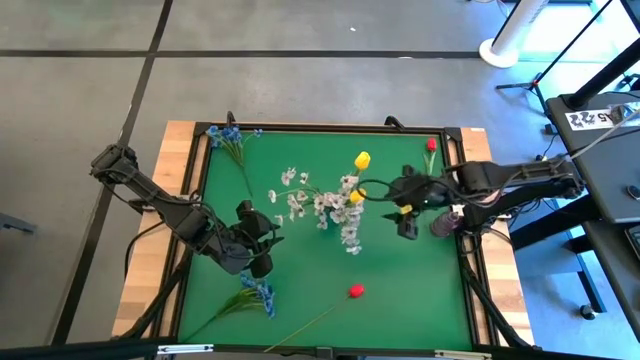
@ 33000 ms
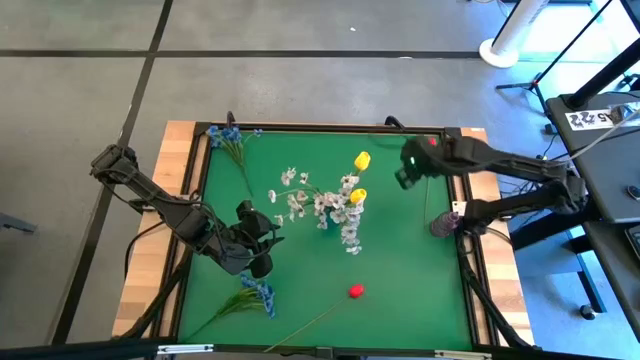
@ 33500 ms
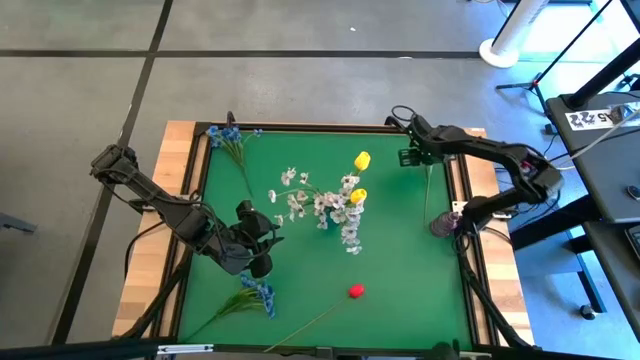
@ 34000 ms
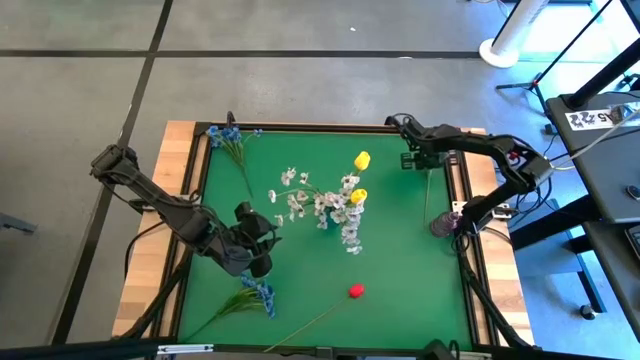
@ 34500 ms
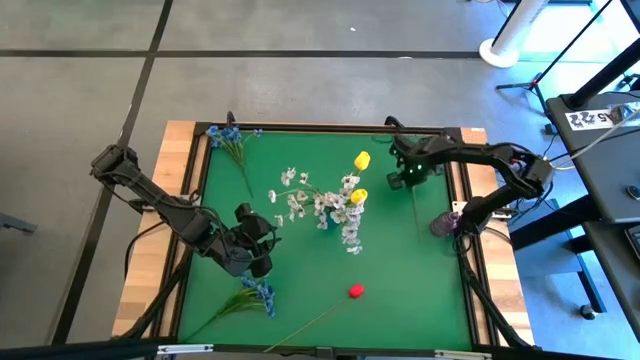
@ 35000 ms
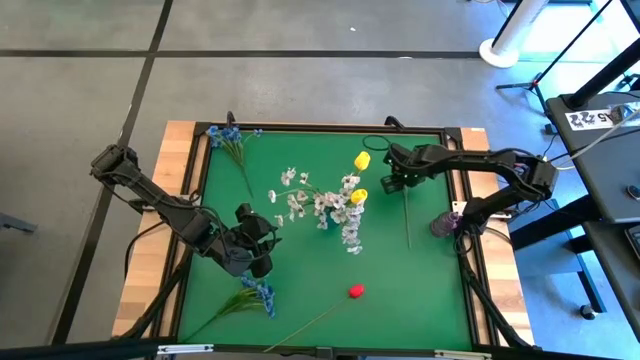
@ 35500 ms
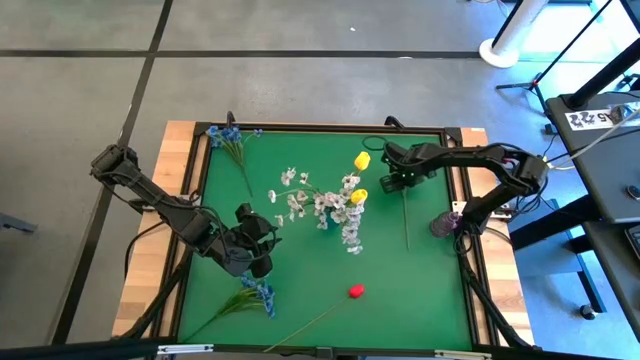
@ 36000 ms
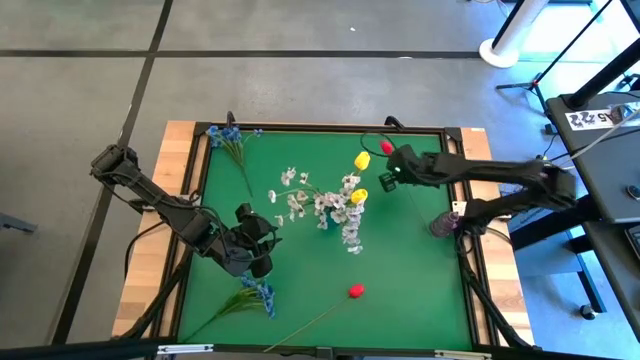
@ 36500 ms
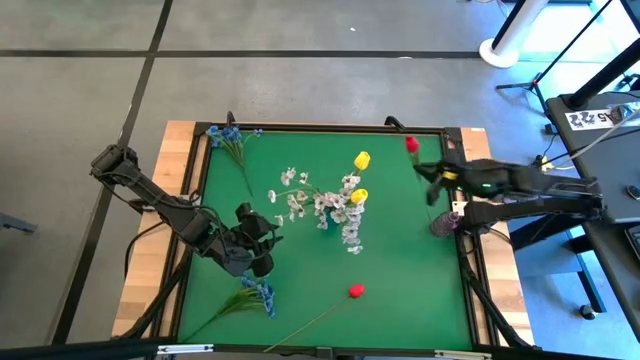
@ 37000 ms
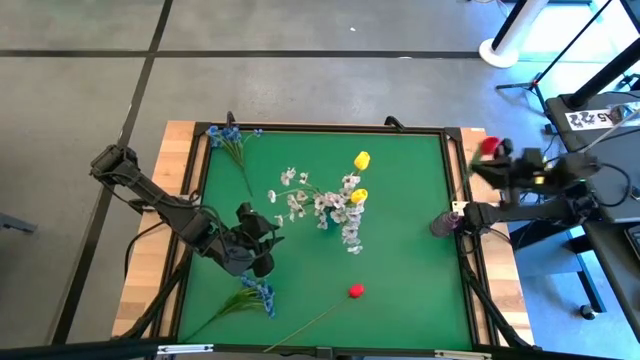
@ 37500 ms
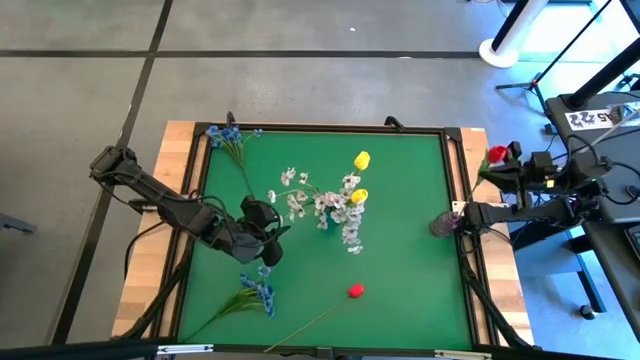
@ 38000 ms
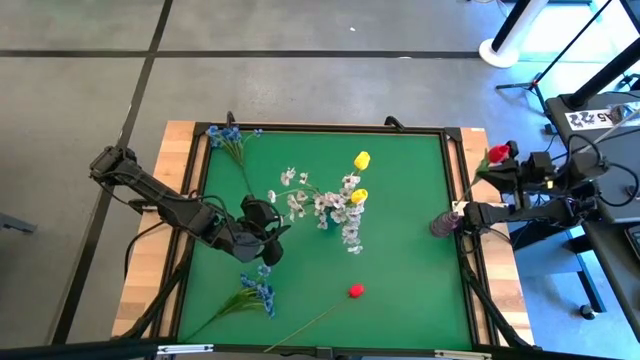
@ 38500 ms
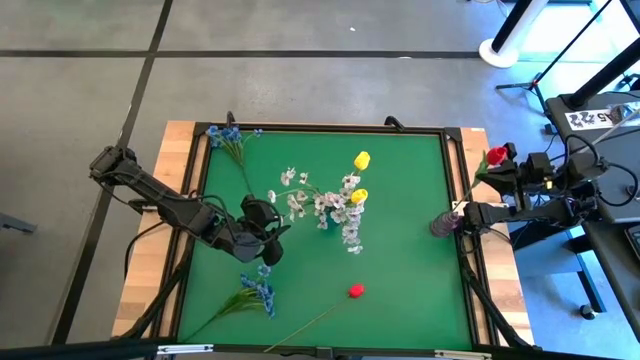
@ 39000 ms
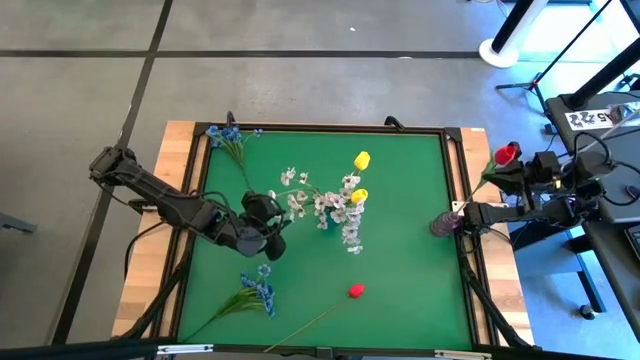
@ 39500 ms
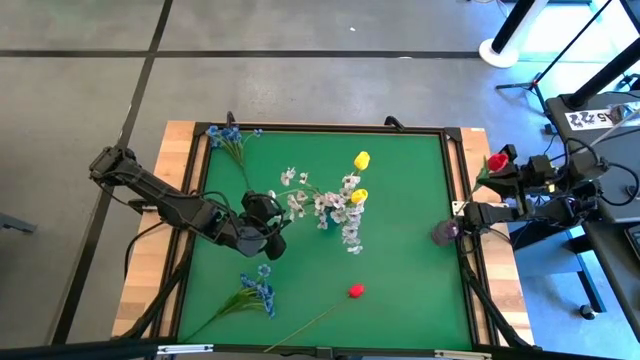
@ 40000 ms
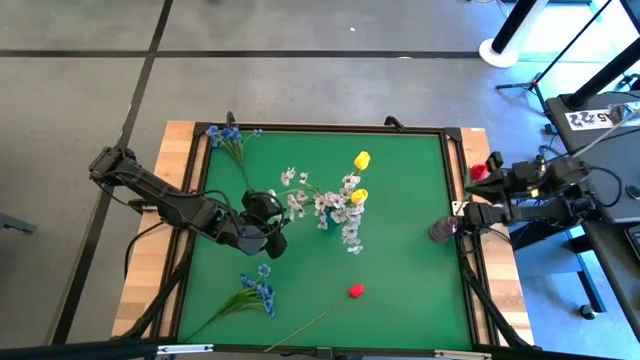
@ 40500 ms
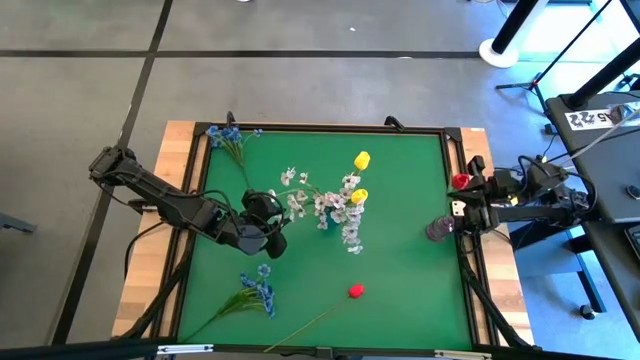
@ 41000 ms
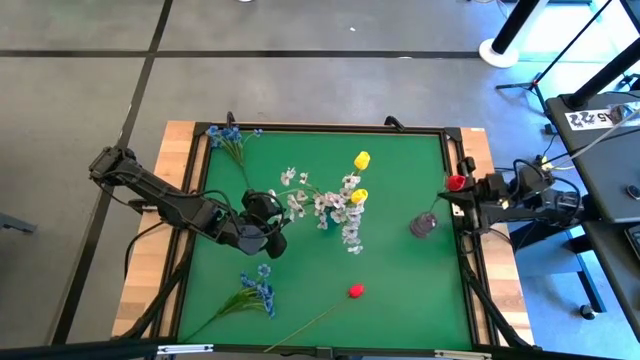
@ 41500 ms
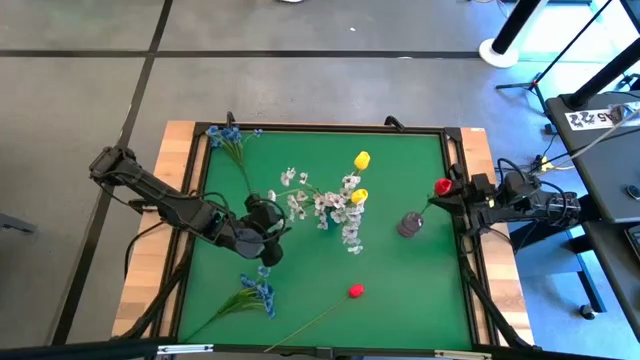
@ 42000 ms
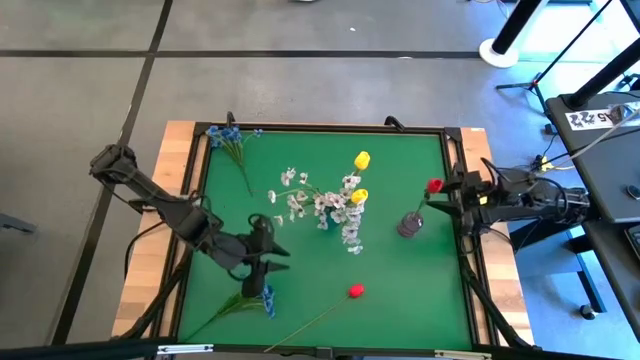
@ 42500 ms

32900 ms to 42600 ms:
Task: Sort flowers into vase by color
Put the top red tulip into the purple vase

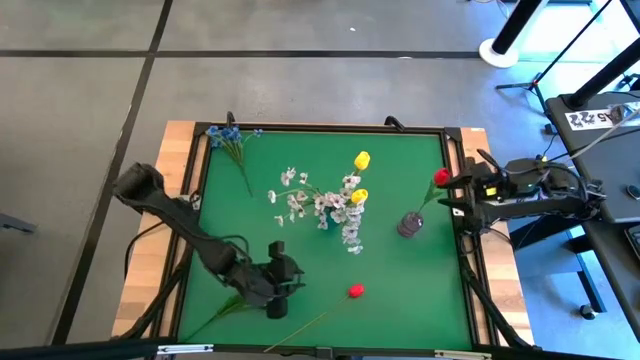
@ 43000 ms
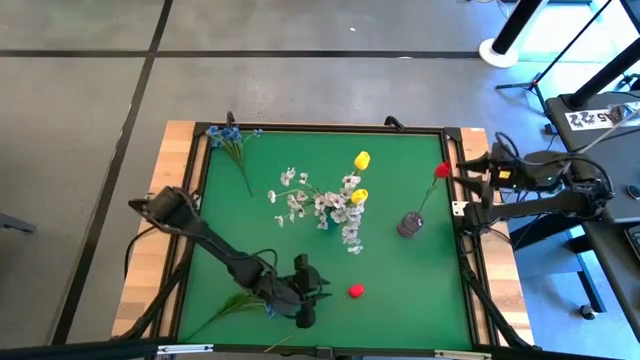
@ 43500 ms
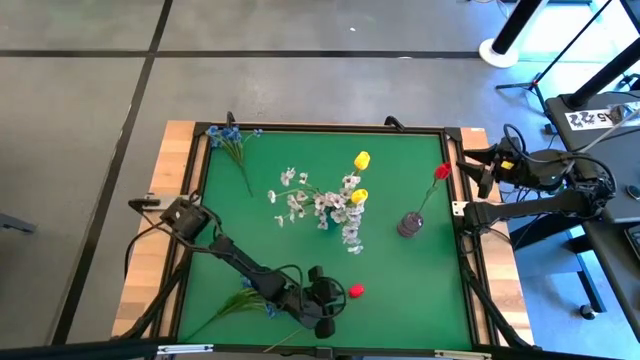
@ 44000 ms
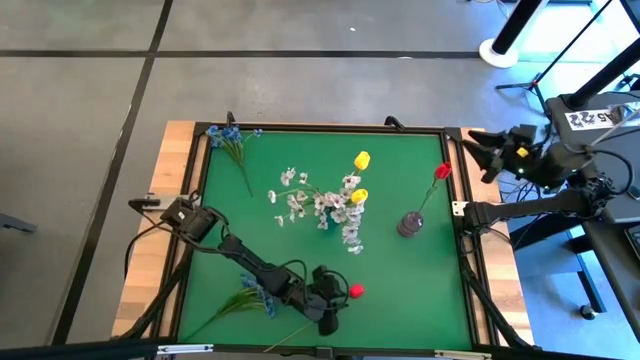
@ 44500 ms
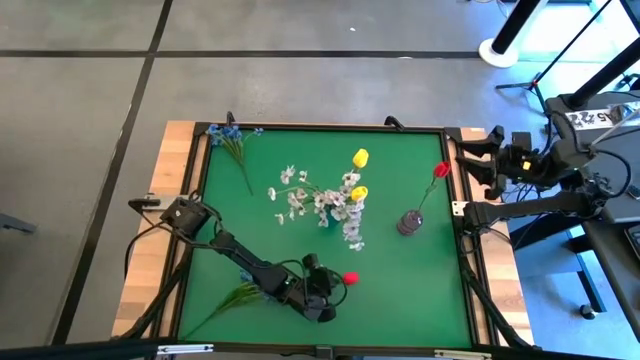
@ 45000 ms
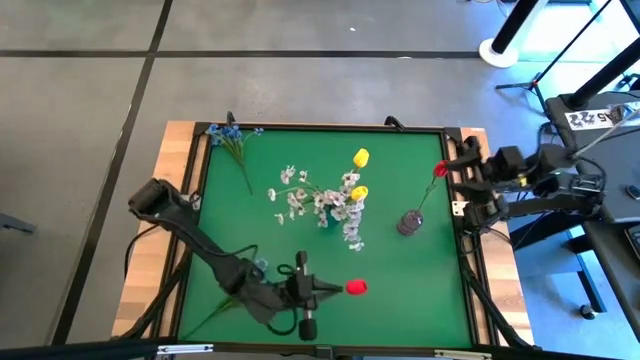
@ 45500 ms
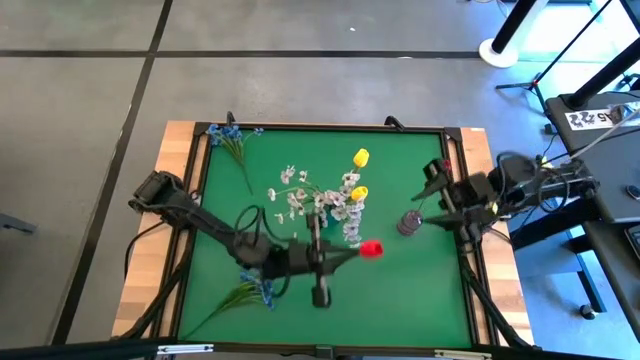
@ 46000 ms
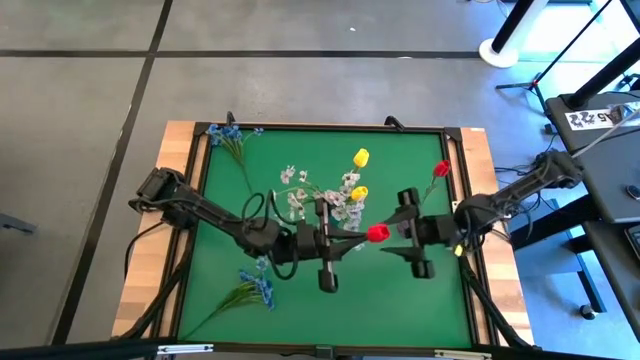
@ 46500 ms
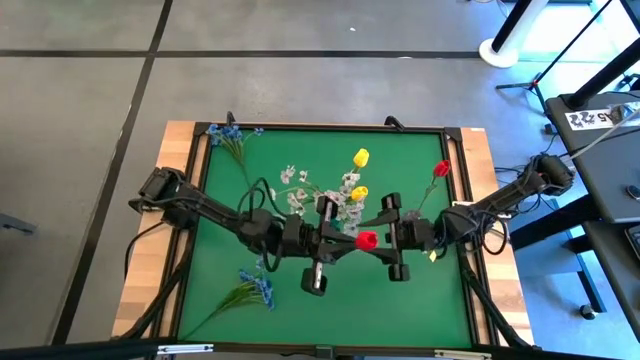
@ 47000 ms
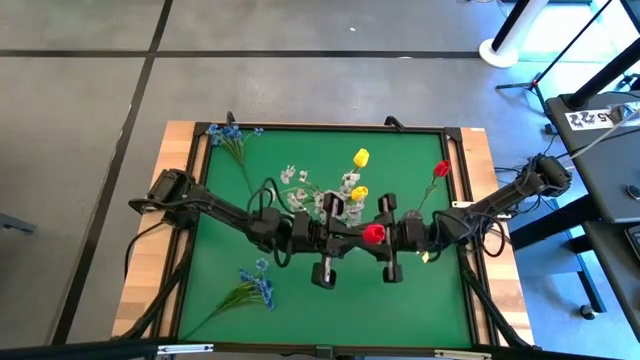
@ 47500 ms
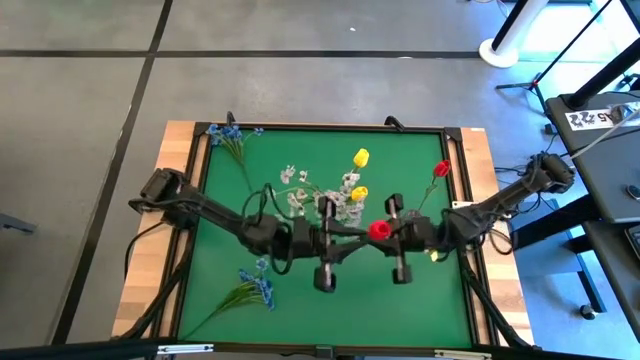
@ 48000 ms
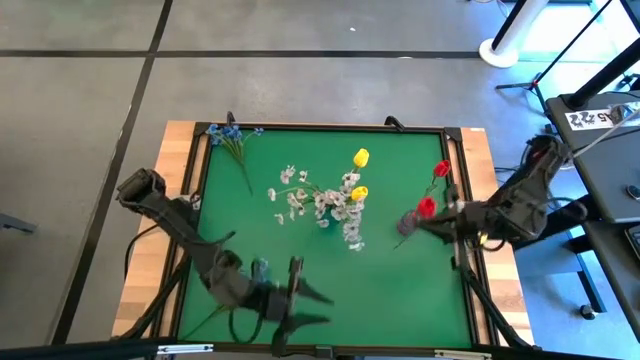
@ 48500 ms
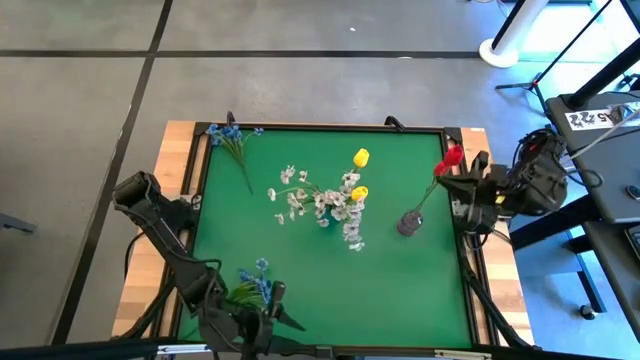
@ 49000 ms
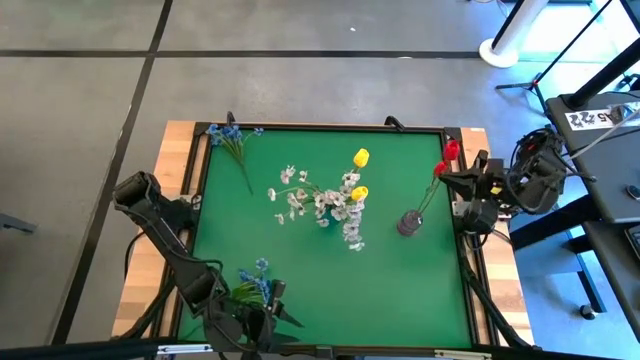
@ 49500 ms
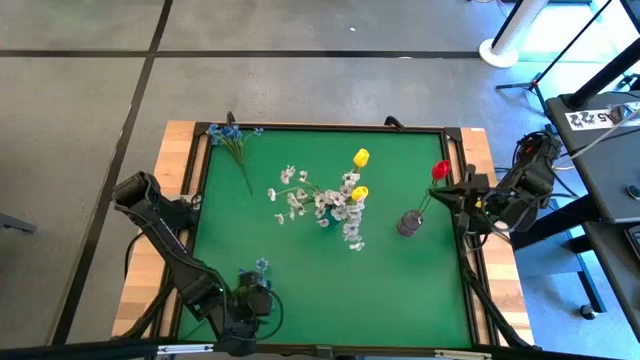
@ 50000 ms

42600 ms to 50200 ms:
Put the red tulip into the purple vase

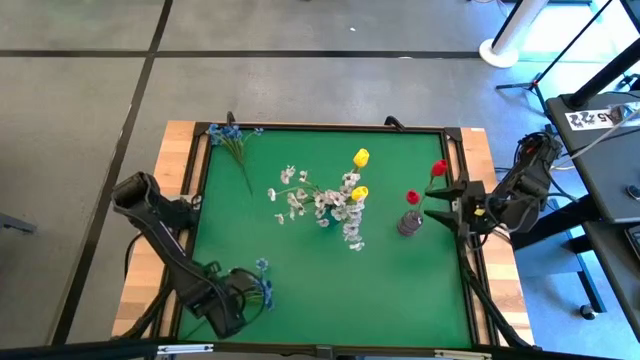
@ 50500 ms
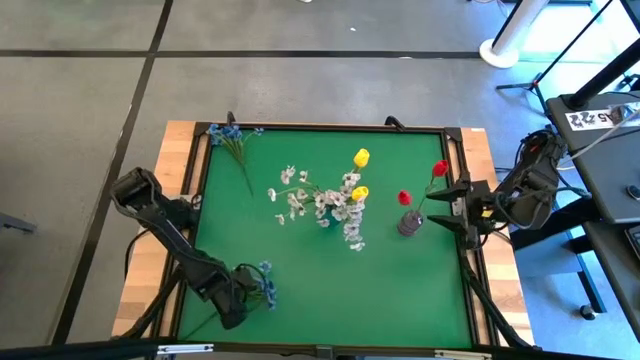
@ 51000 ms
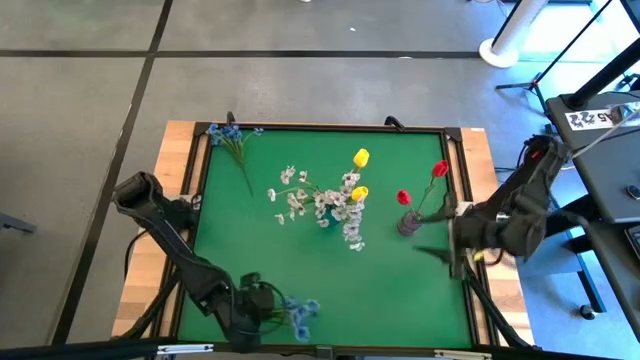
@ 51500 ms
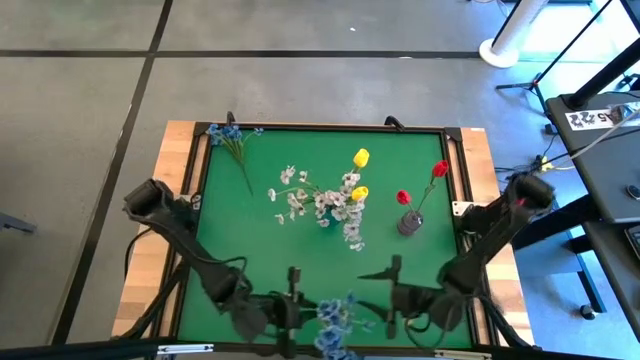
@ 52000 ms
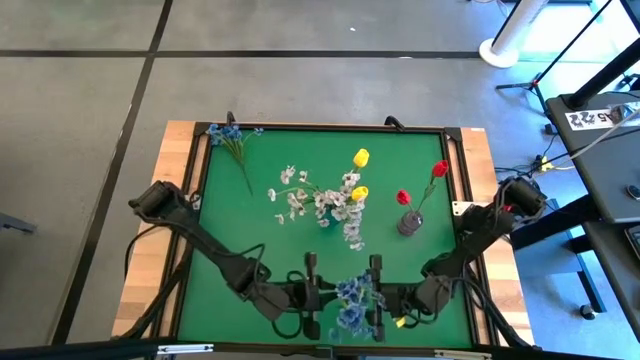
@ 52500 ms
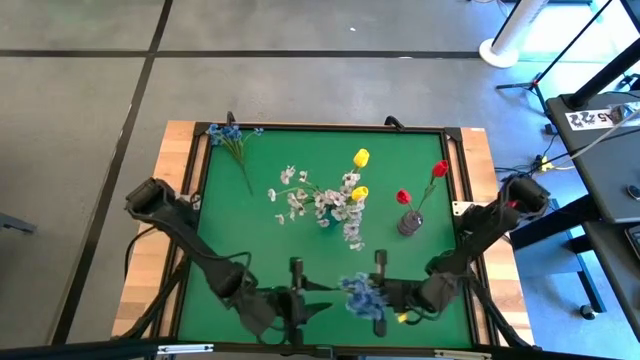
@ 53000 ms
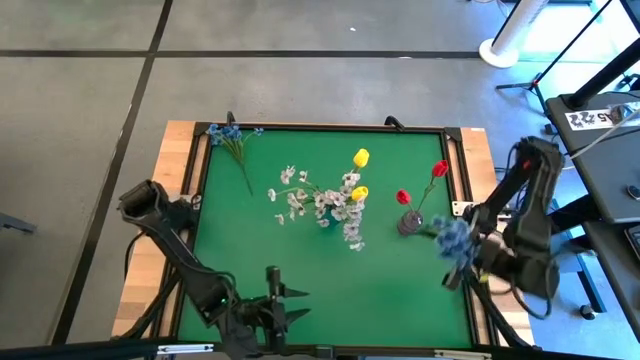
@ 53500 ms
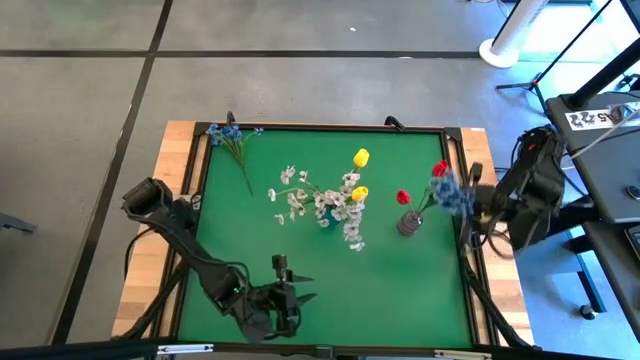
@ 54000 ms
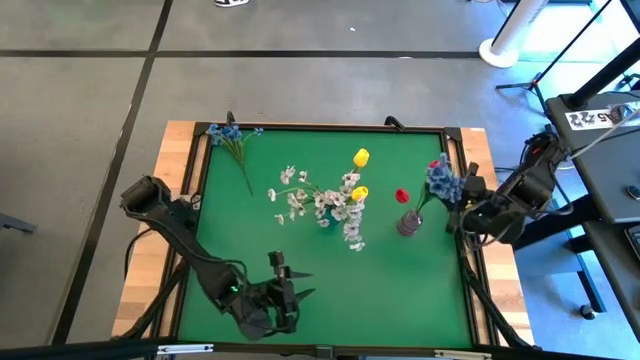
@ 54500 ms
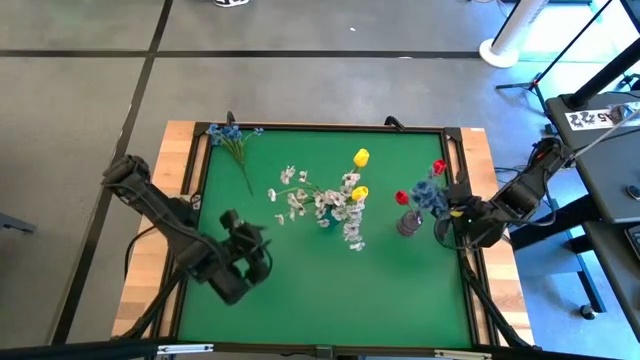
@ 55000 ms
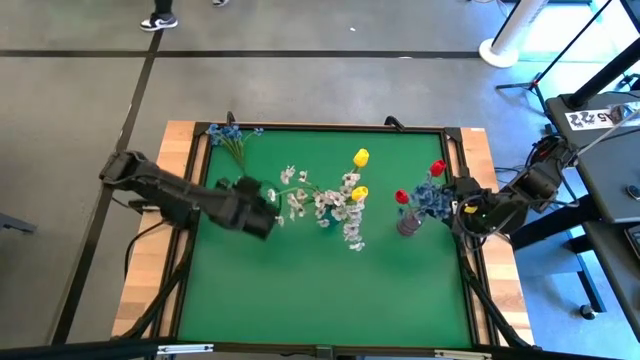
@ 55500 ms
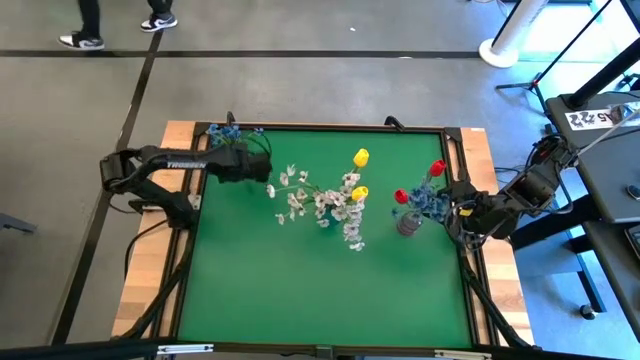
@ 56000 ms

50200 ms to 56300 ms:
Put the bottom blue flowers into the purple vase
